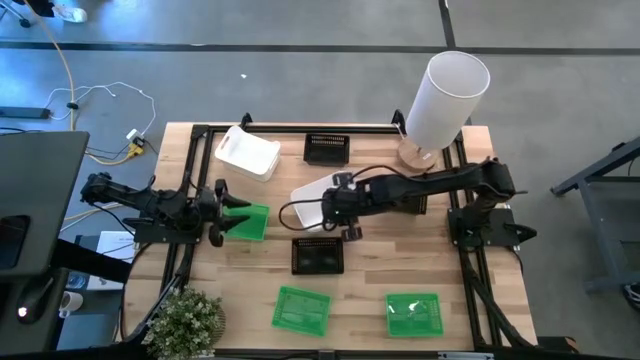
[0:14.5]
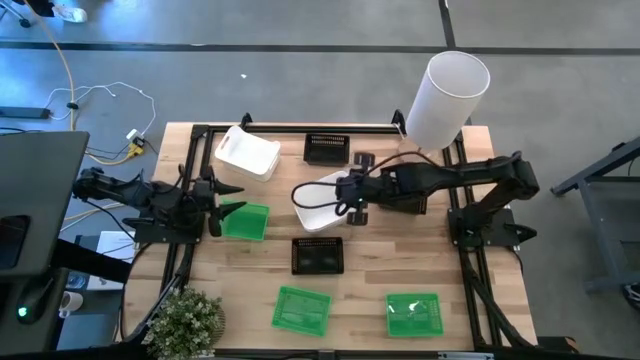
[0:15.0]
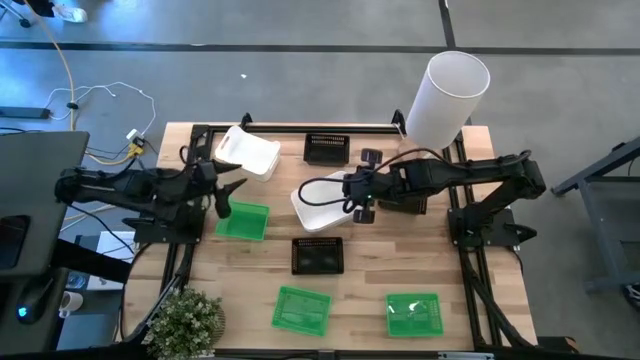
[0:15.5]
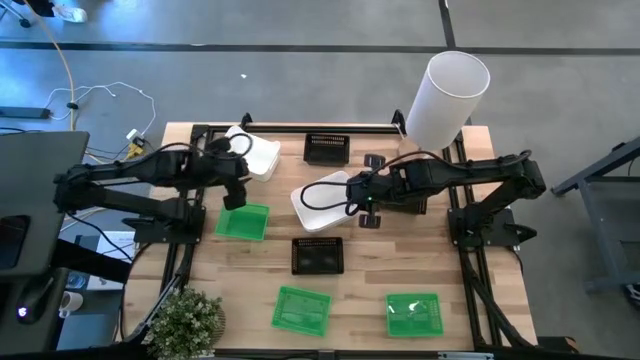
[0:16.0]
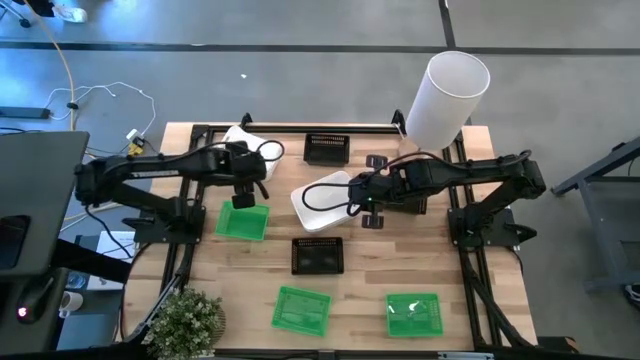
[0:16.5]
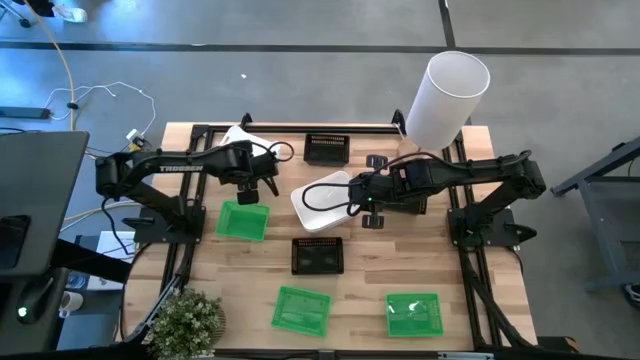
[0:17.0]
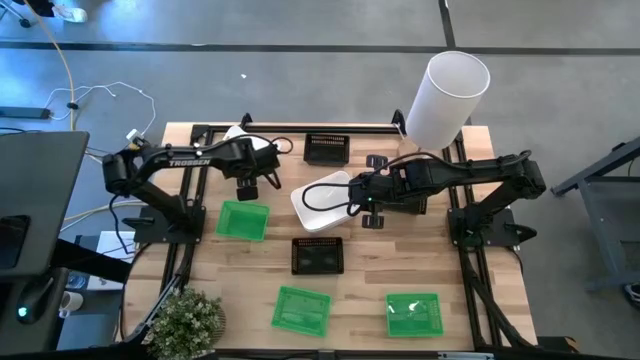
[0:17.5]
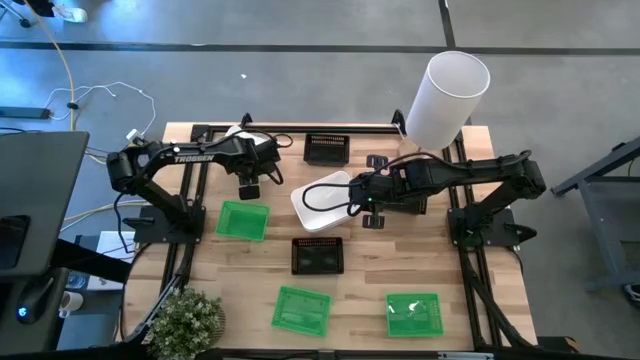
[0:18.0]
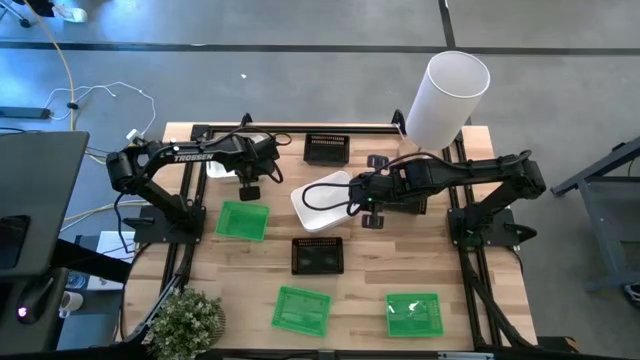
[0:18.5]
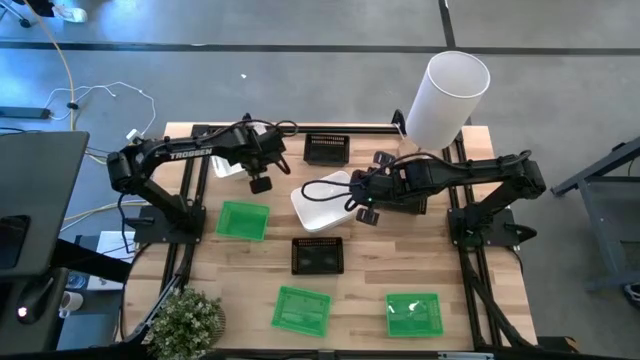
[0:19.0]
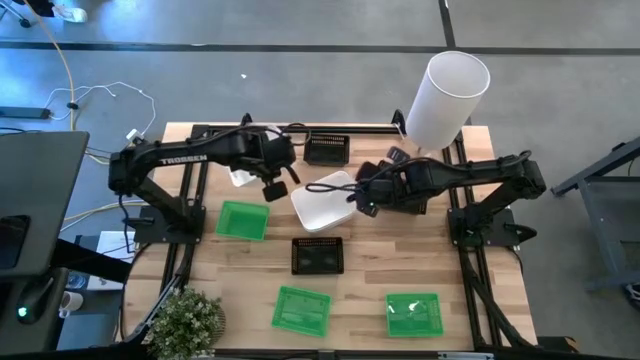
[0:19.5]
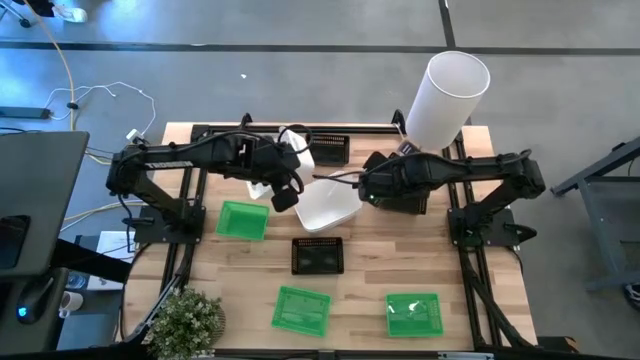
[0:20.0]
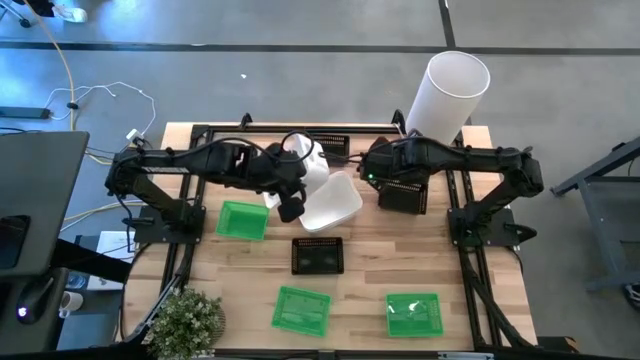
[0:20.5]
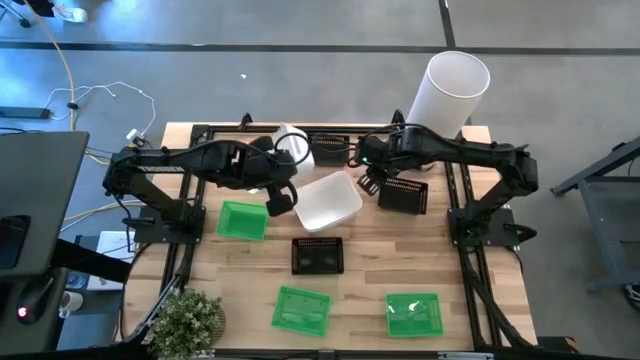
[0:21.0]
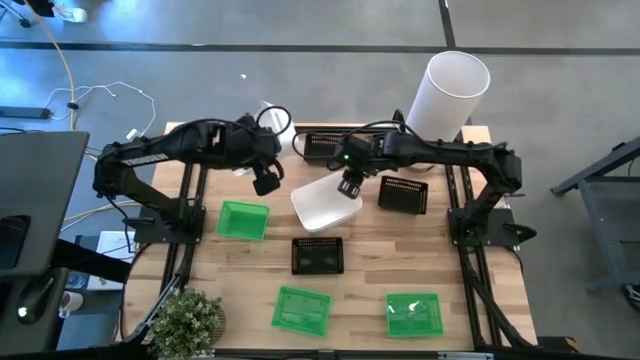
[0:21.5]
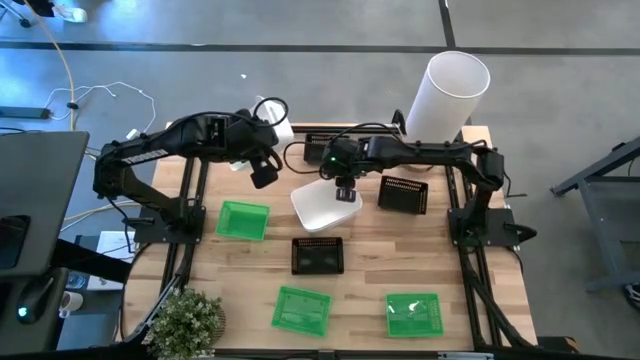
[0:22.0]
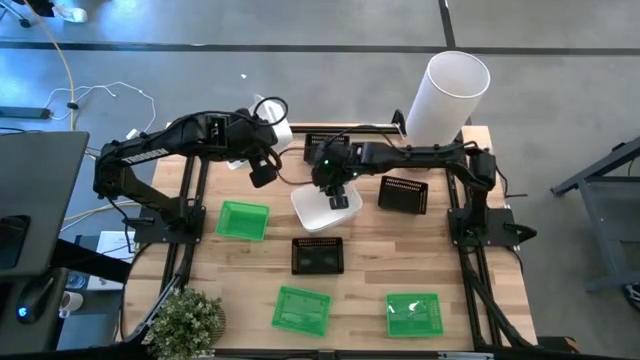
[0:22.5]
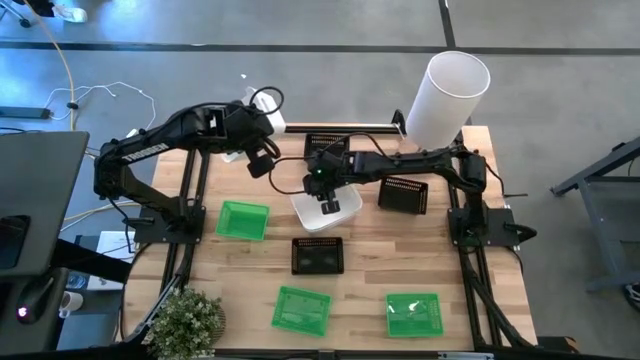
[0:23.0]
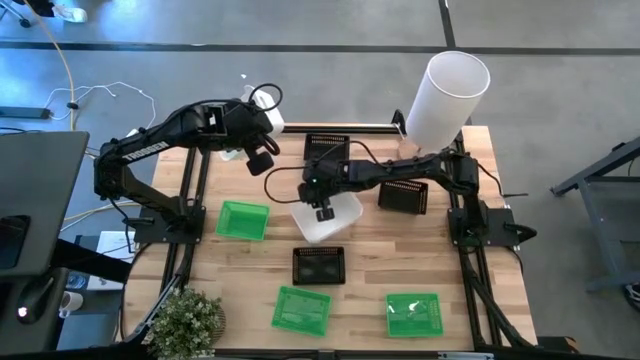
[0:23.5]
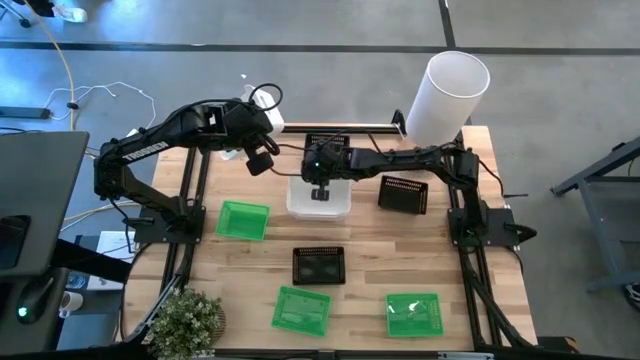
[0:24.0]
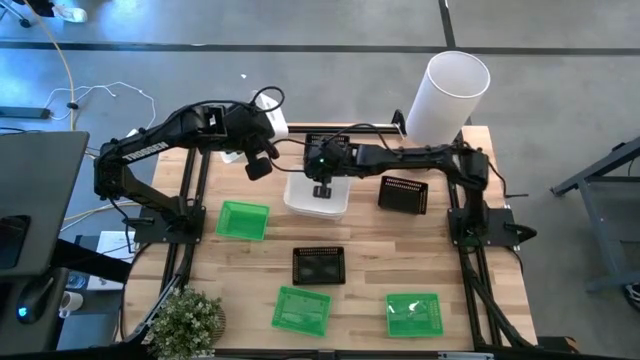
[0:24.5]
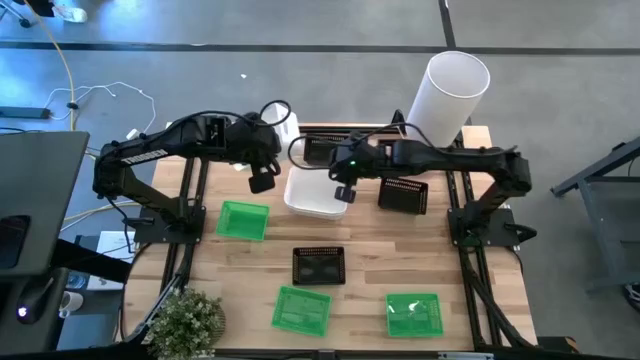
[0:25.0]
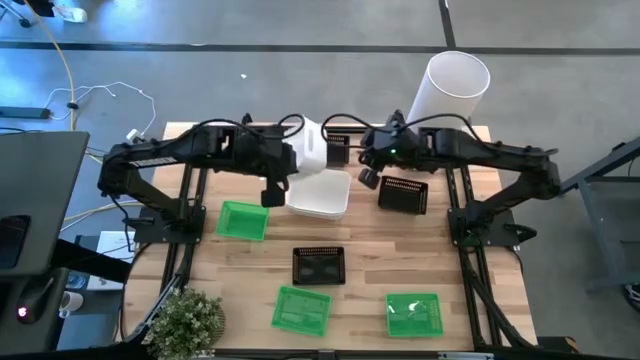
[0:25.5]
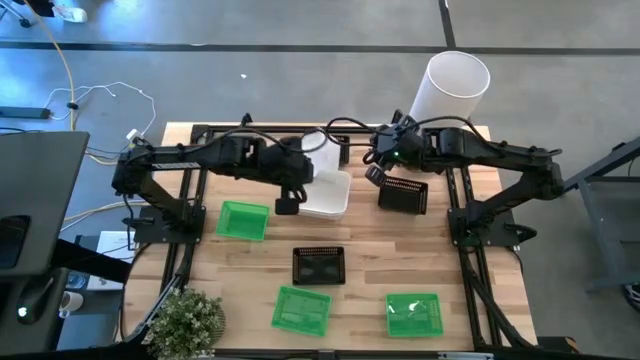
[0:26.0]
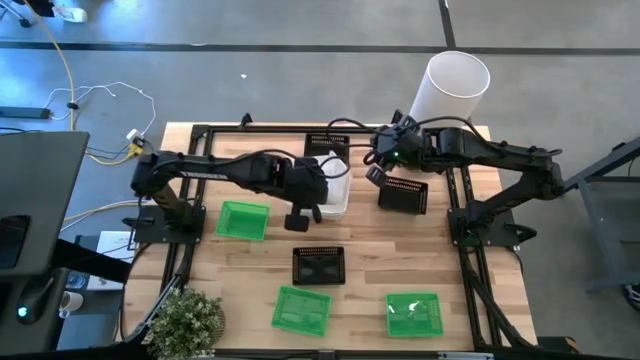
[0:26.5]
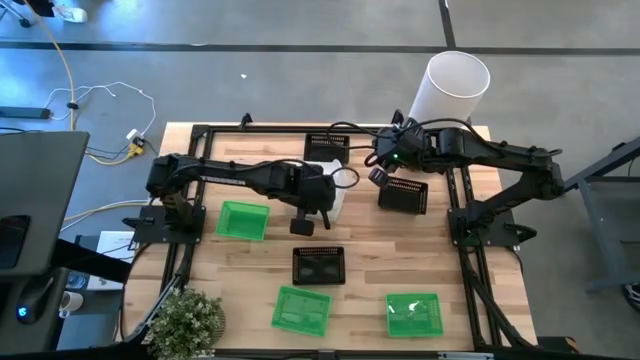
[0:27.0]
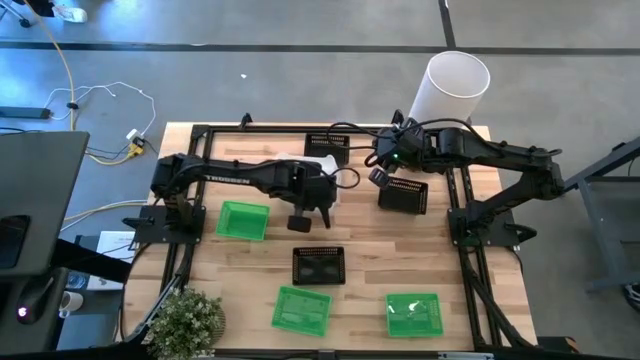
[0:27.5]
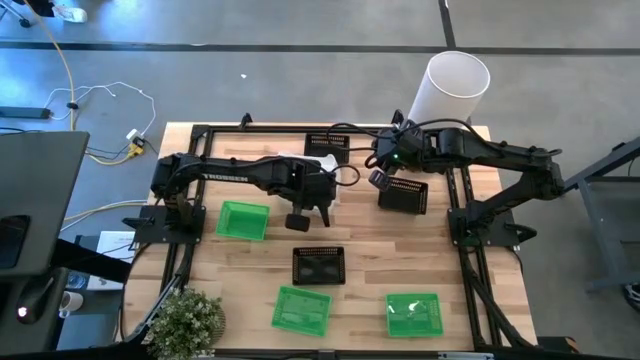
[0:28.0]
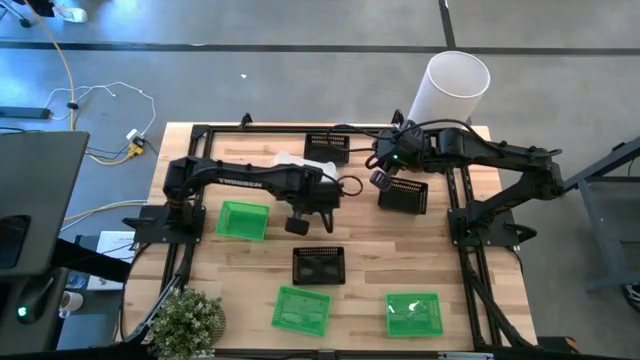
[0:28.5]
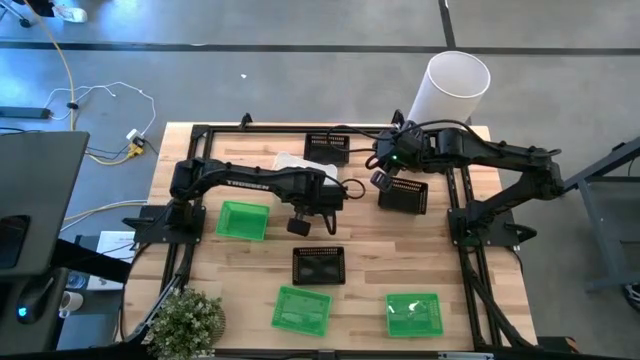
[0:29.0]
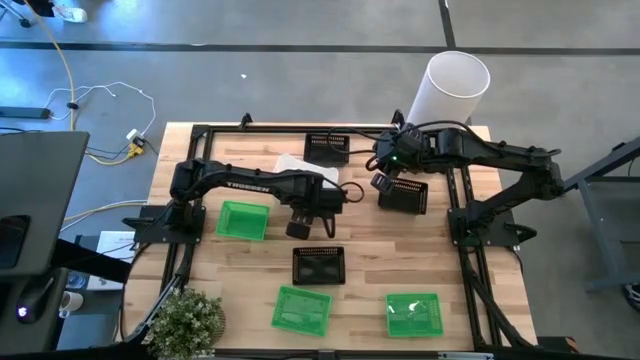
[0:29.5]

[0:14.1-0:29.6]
Stack the top white bin on top of the other white bins

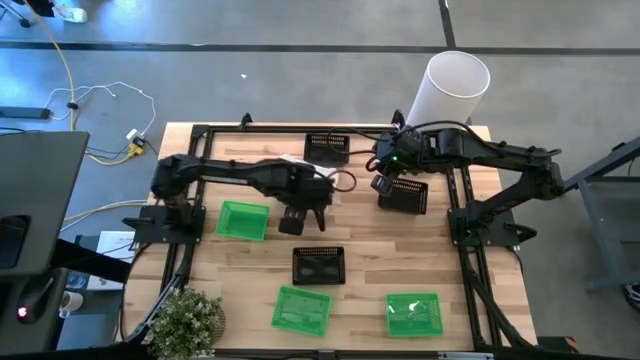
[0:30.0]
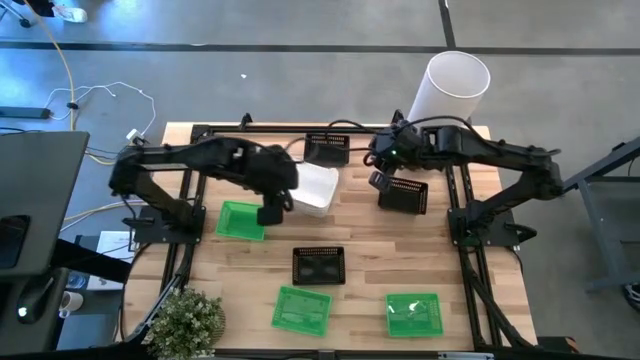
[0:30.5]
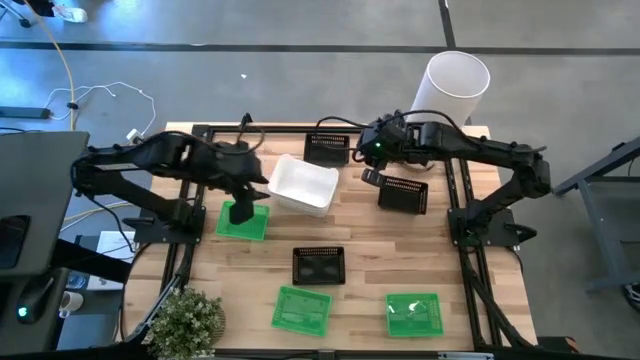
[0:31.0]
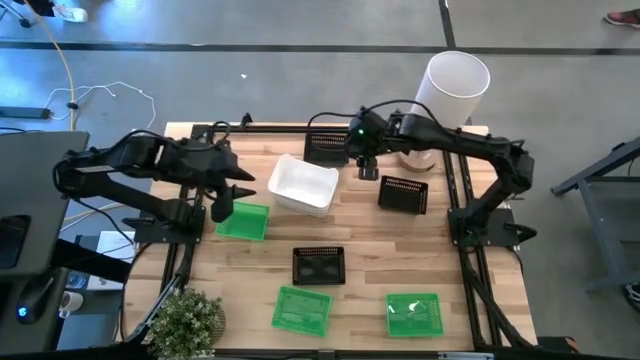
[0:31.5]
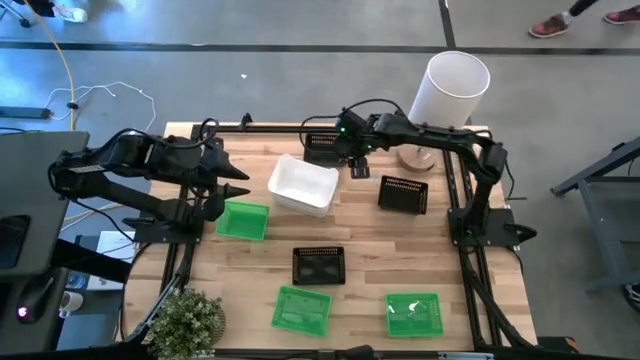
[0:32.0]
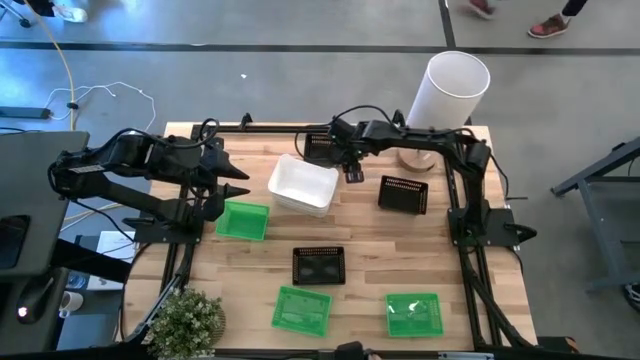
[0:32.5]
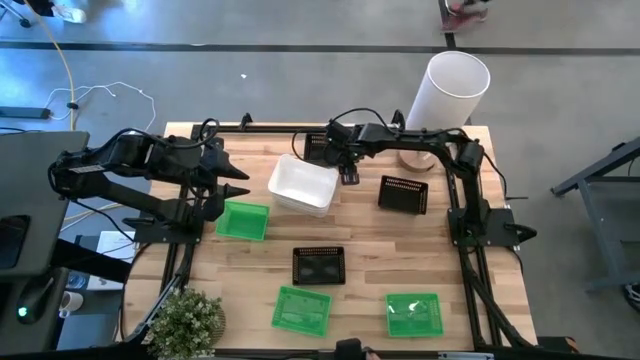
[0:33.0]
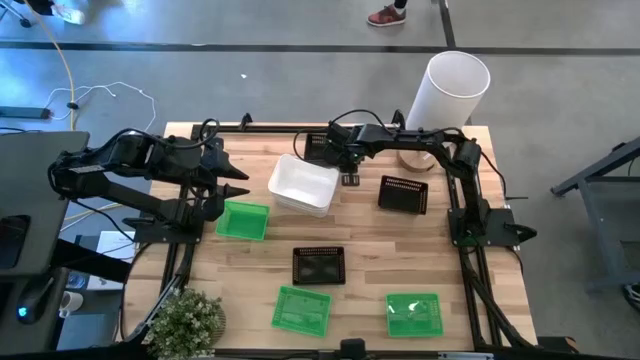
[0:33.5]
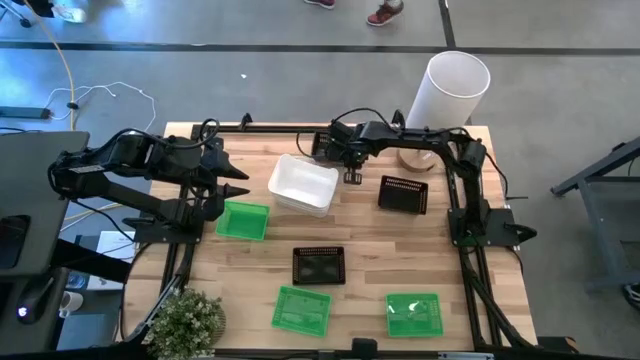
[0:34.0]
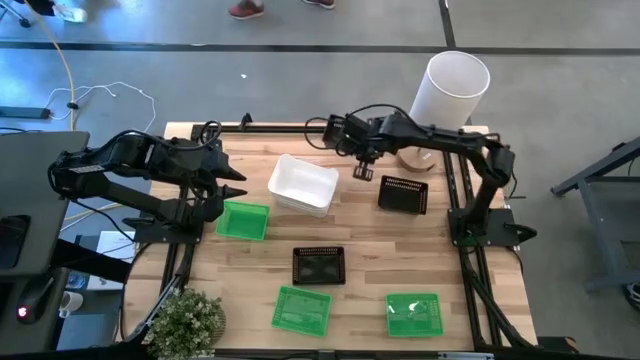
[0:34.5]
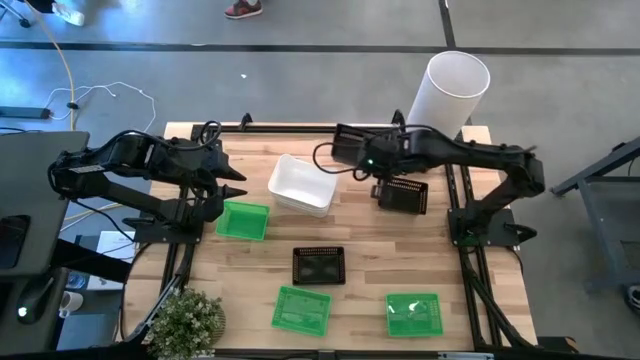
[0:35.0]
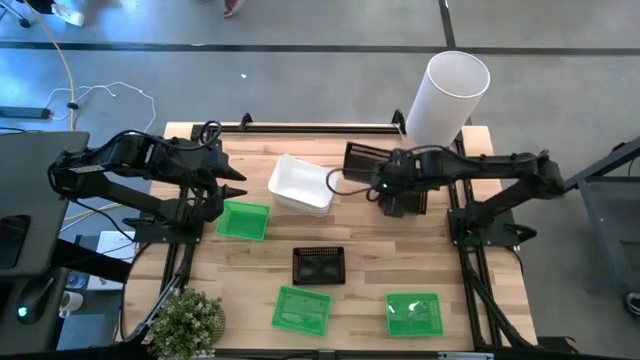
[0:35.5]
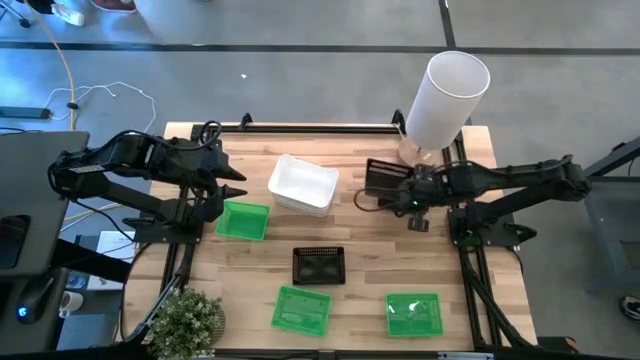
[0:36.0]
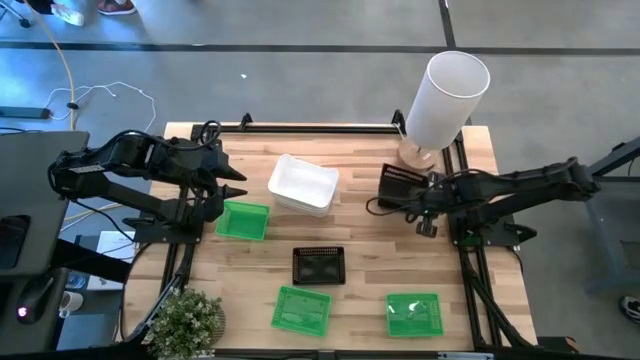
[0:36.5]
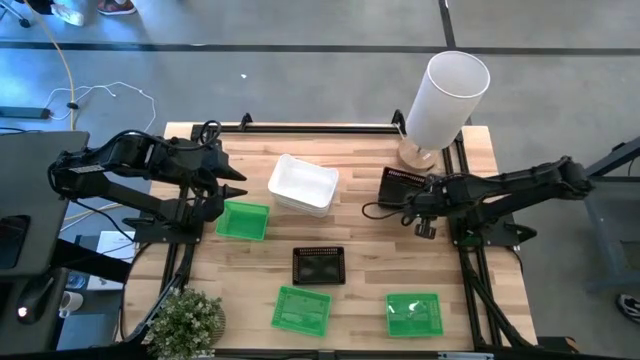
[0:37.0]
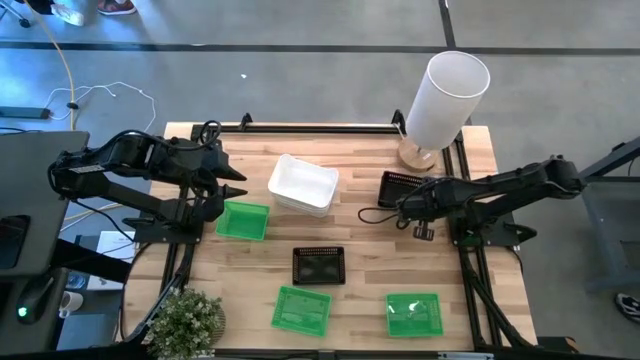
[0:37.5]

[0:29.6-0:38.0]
Stack the top black bin on top of the middle black bin
